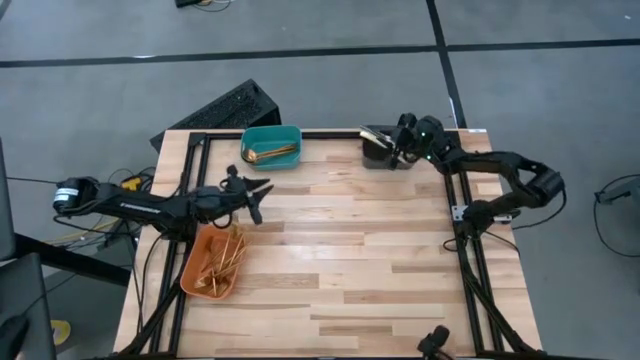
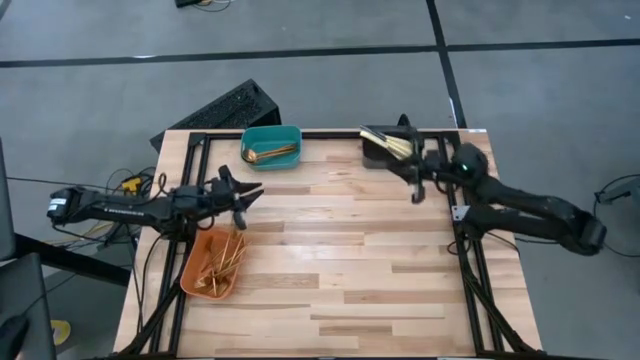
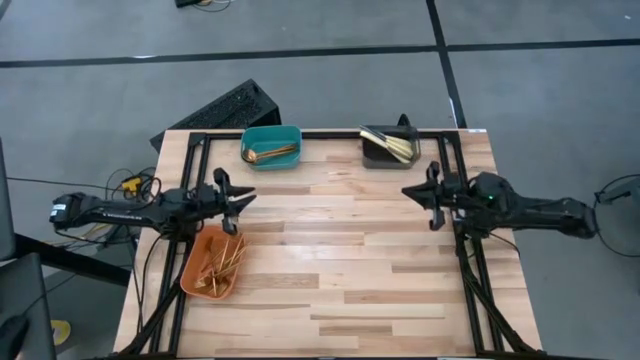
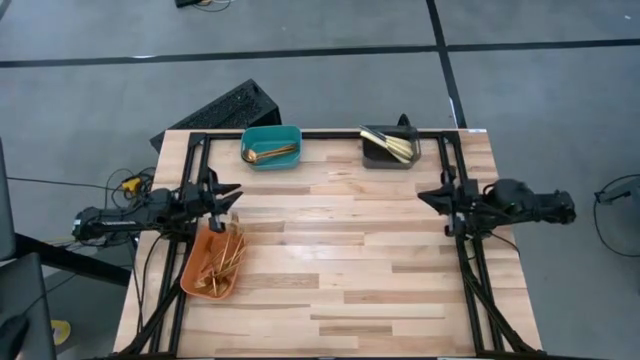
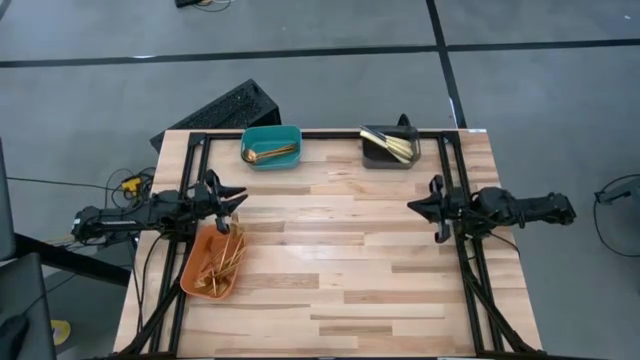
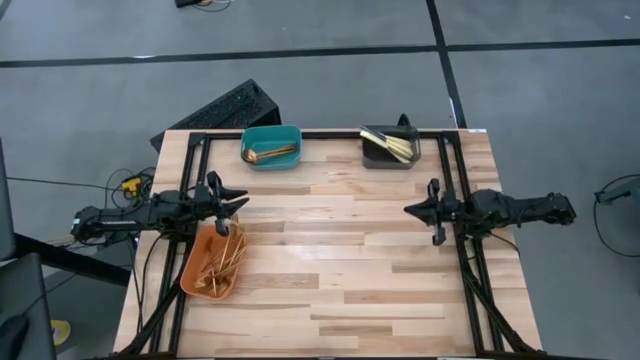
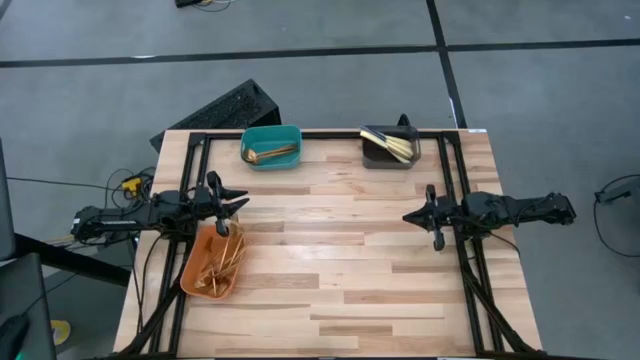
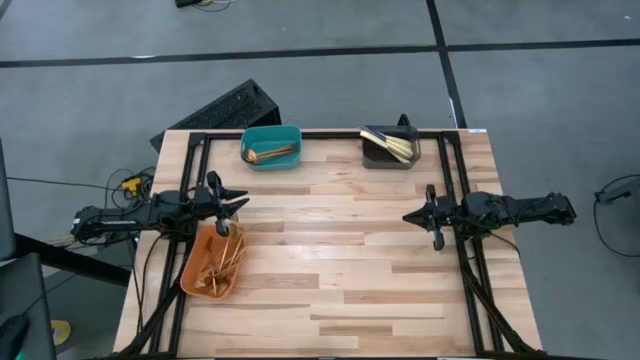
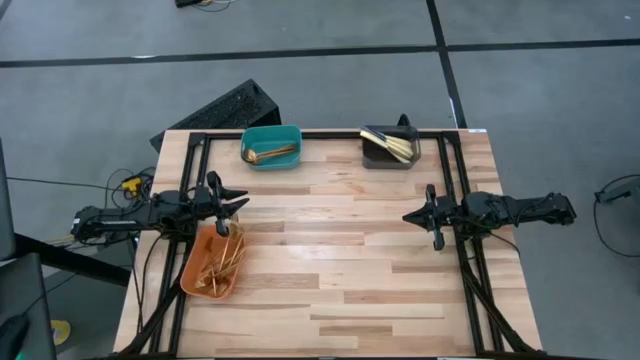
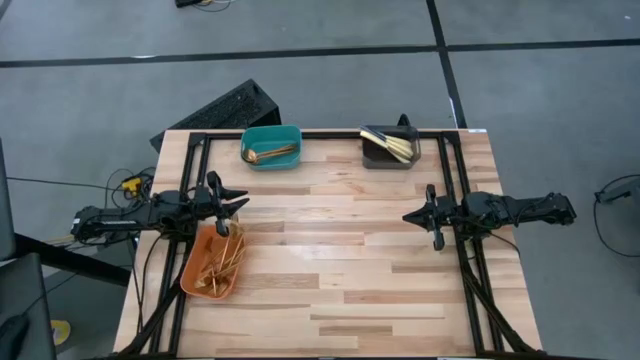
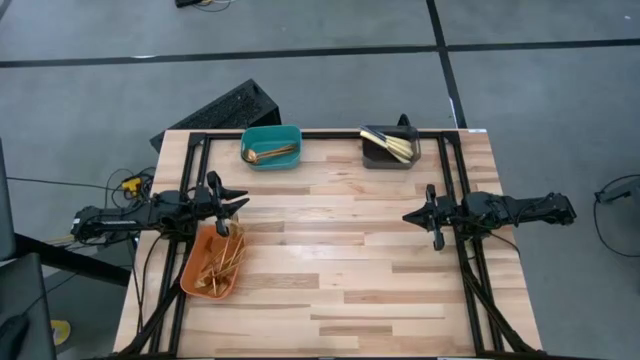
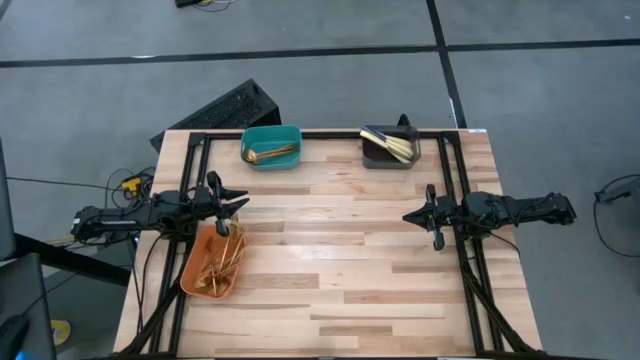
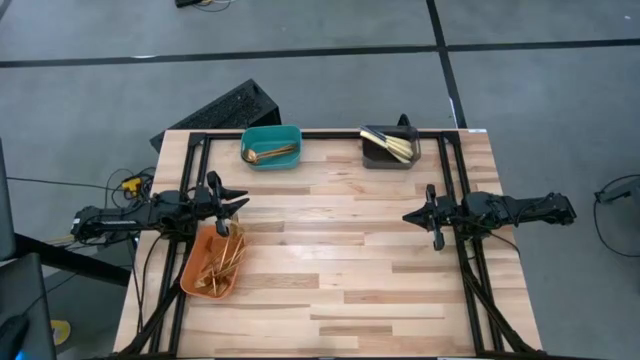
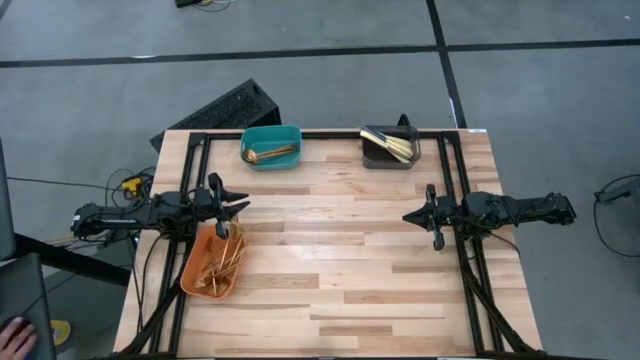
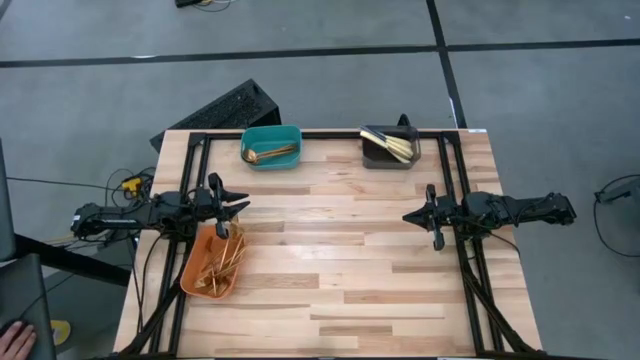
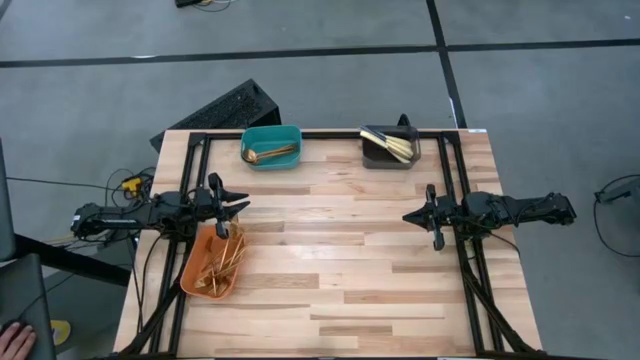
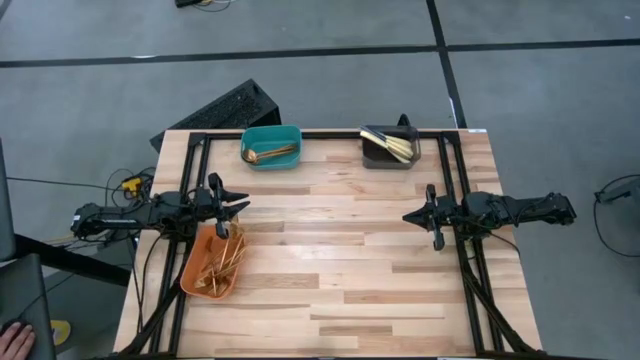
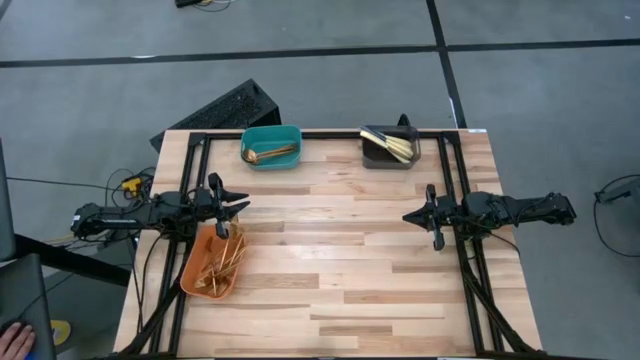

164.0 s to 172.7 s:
Task: Sort silverware by color (type)
Return to Home Position

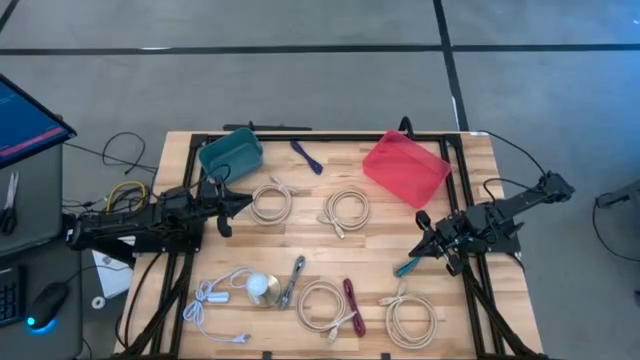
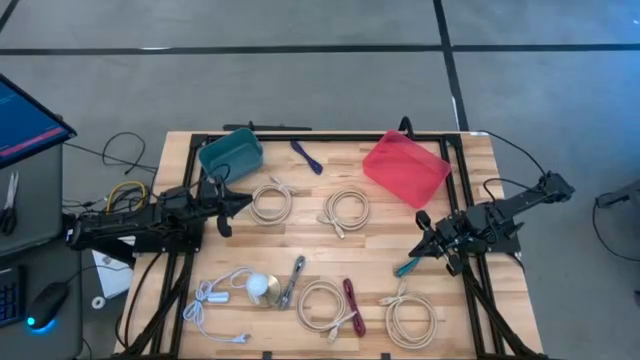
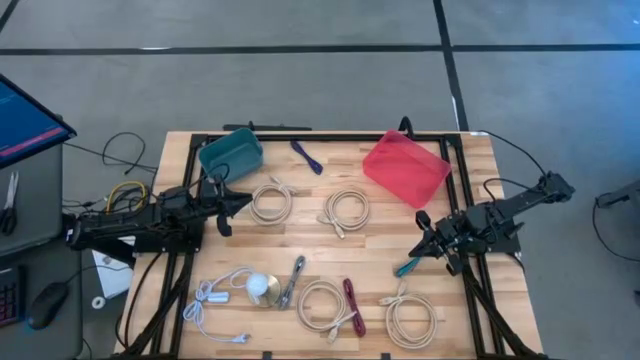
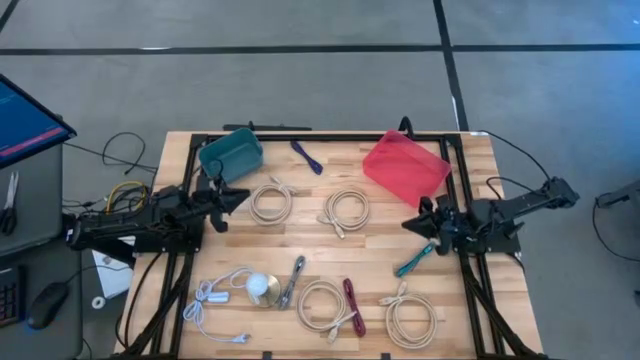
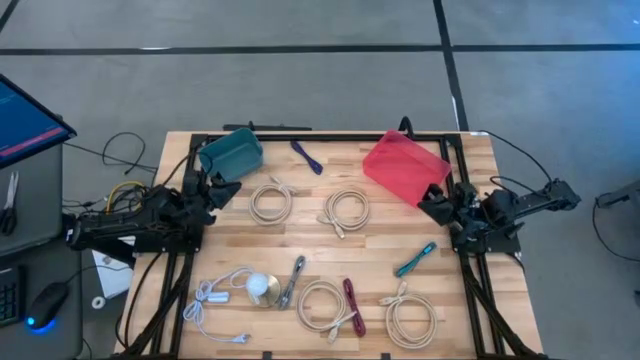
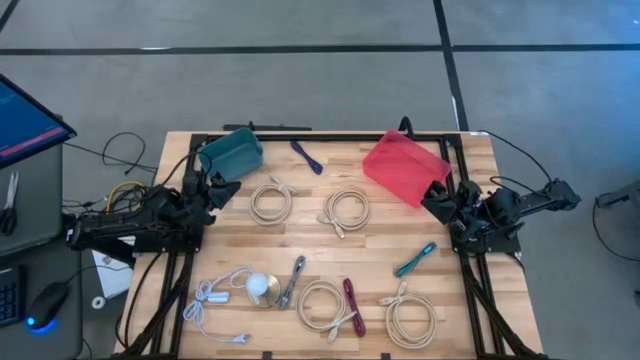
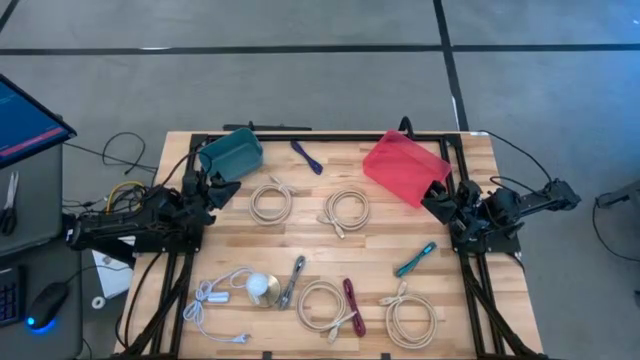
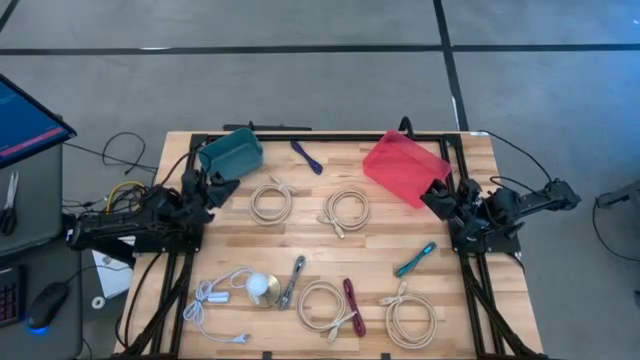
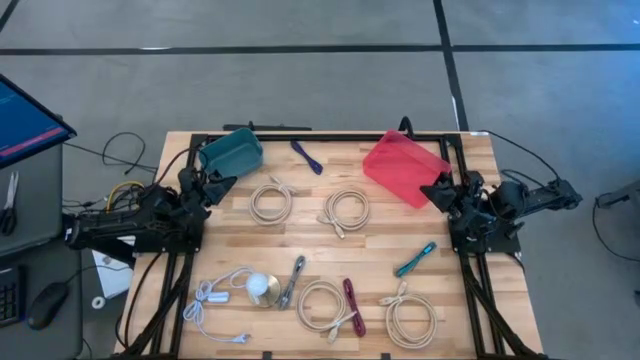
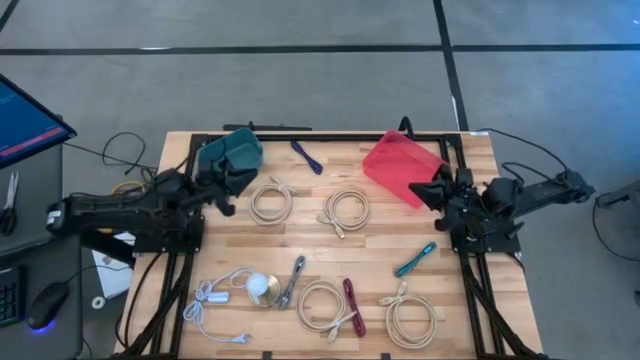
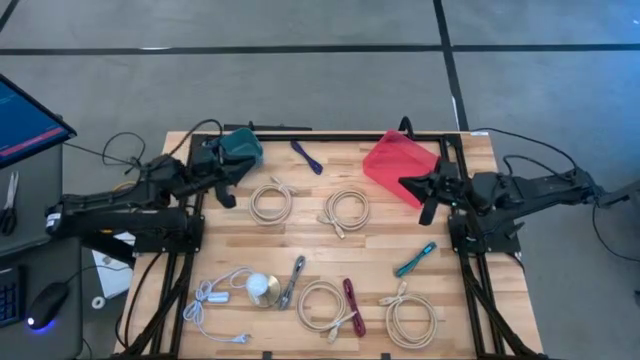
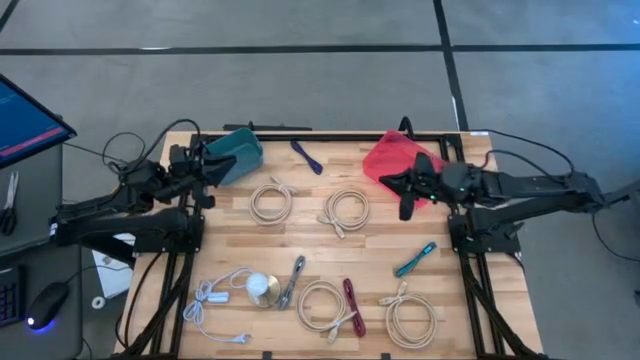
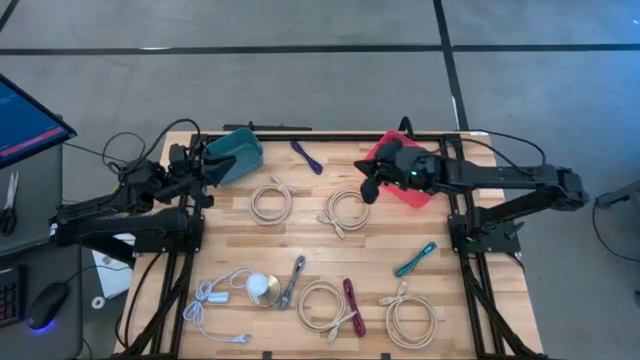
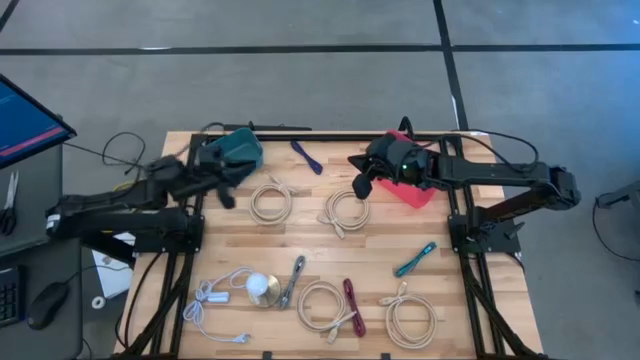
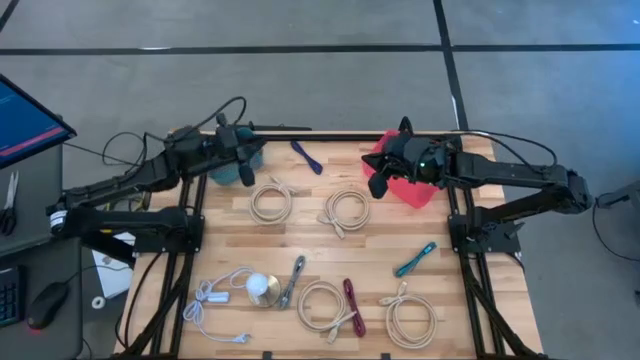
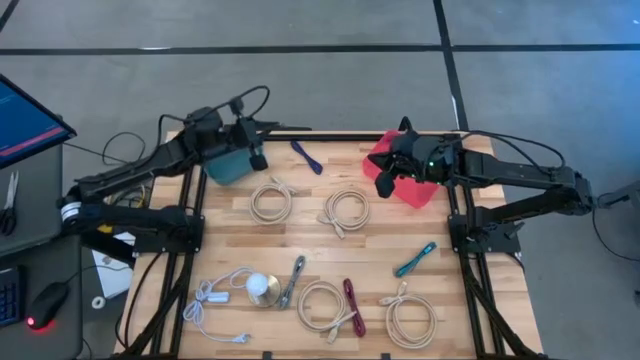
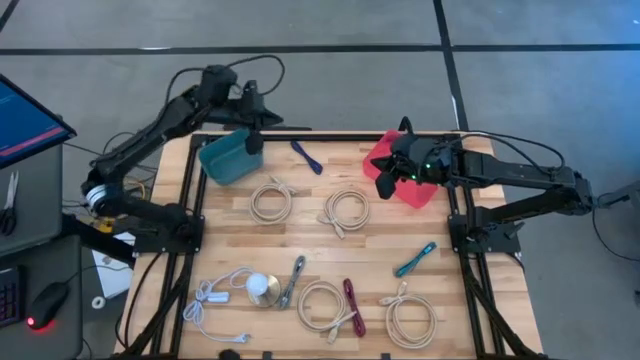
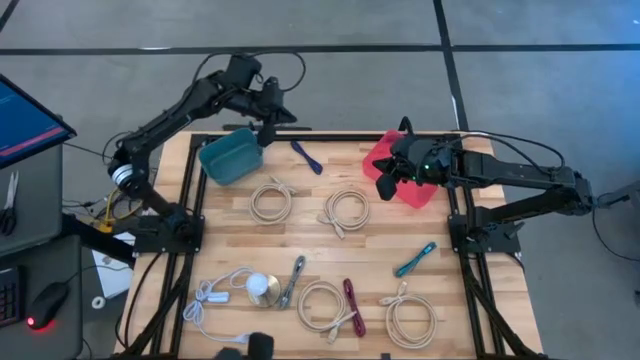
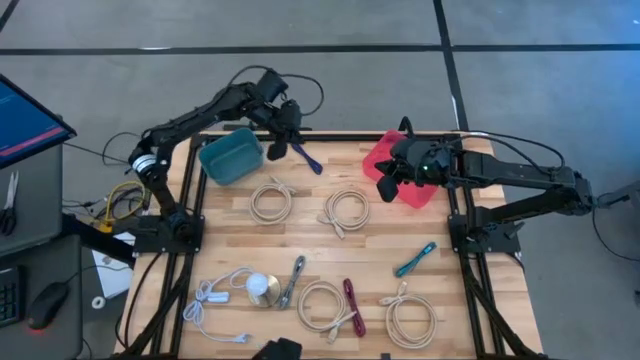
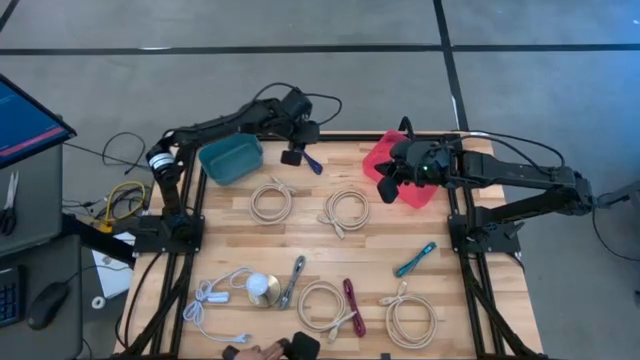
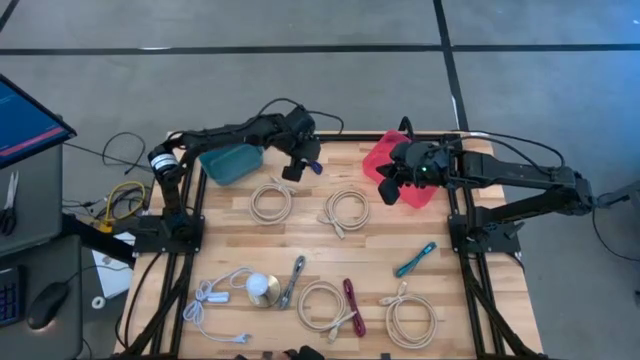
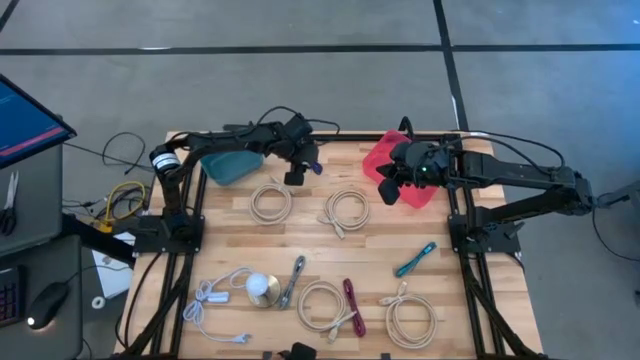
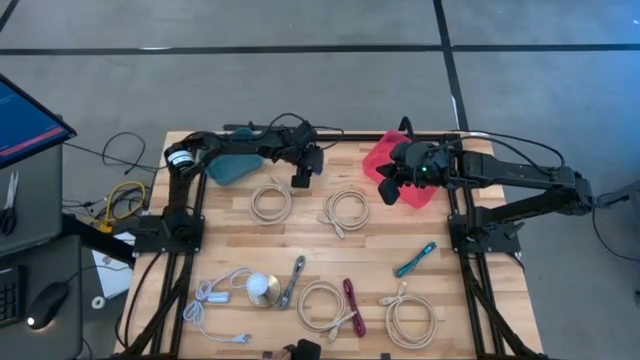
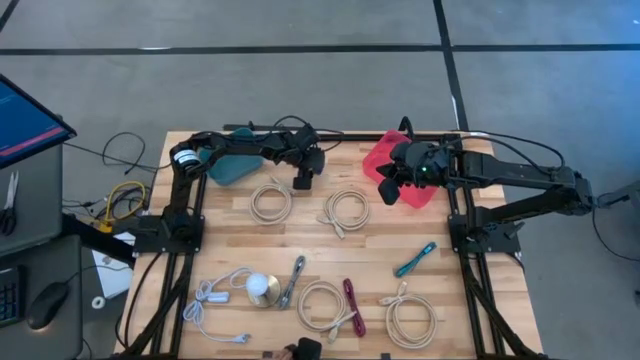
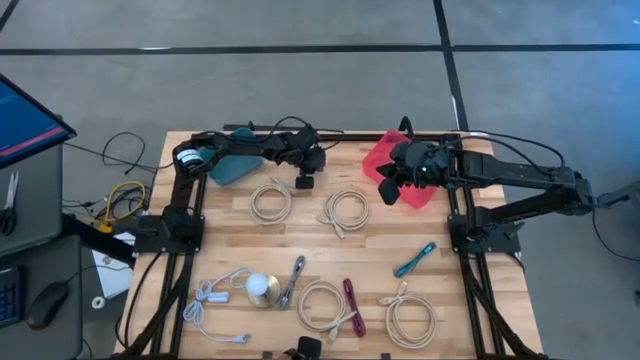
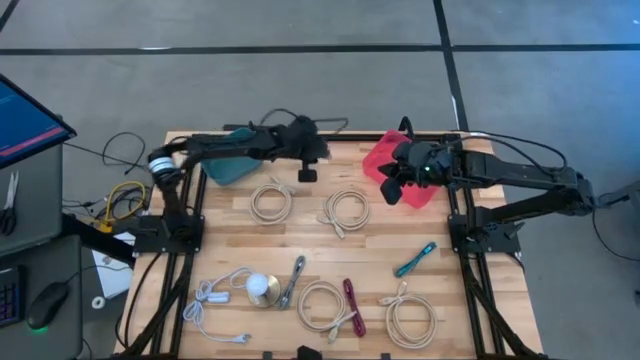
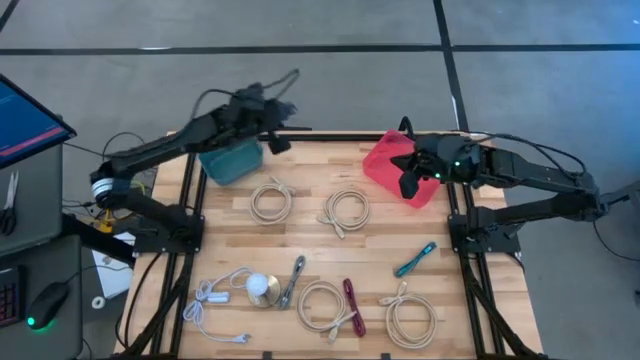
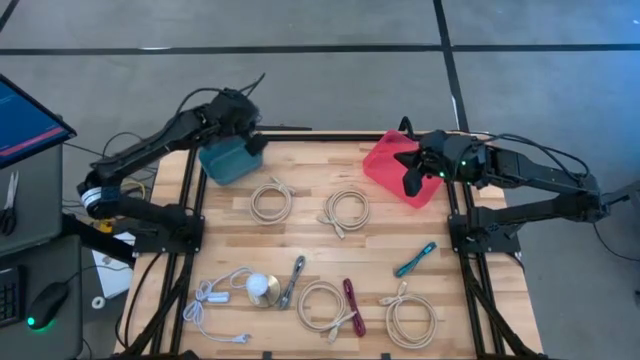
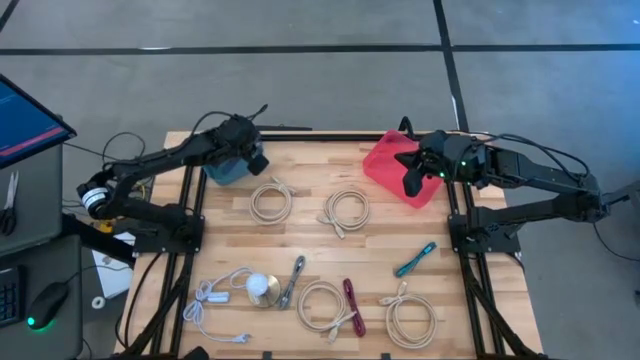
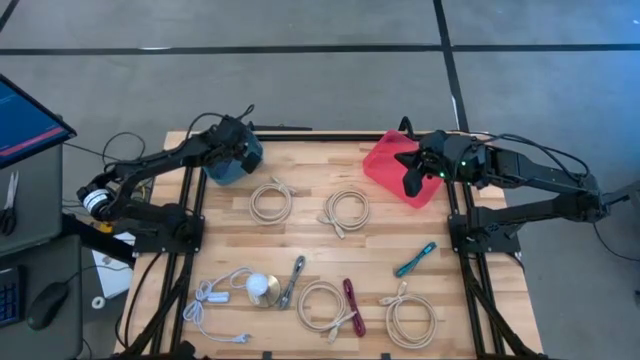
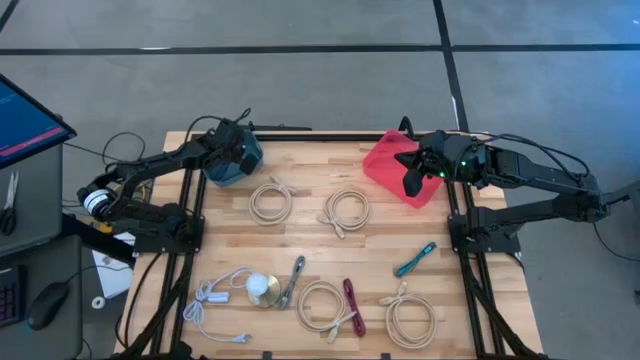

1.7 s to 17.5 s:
Task: Pick & Place USB Port
Put the blue dark blue charger cable into blue bin
